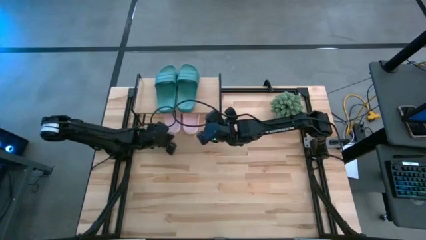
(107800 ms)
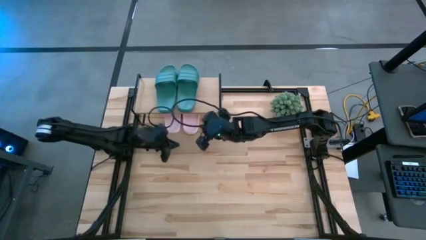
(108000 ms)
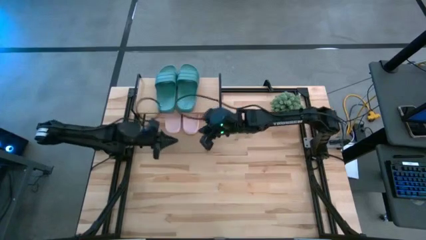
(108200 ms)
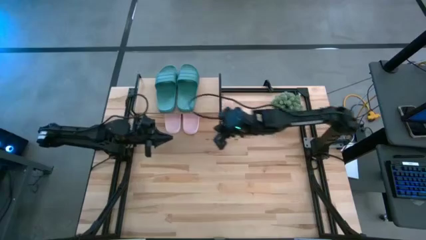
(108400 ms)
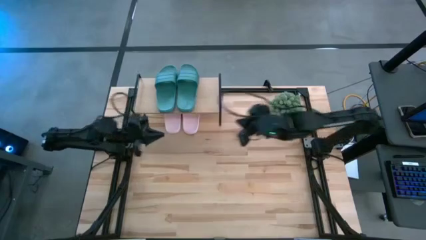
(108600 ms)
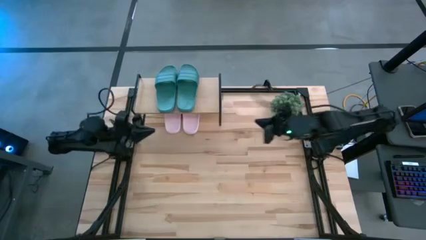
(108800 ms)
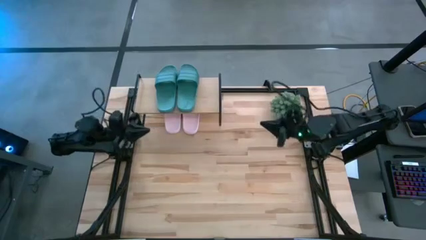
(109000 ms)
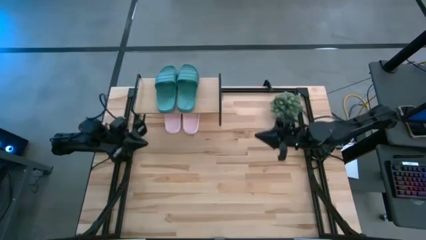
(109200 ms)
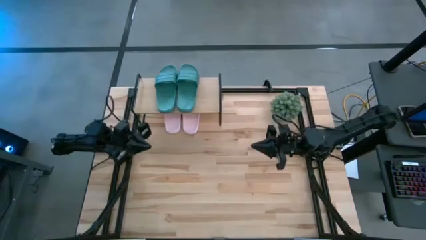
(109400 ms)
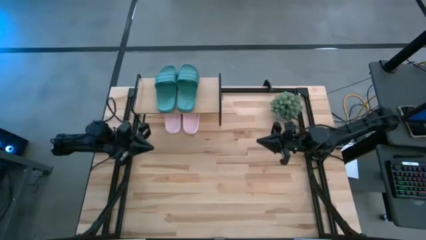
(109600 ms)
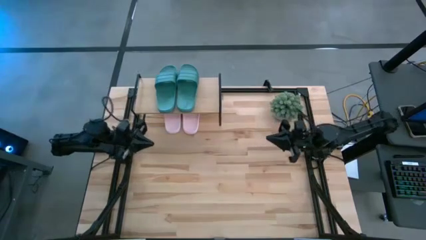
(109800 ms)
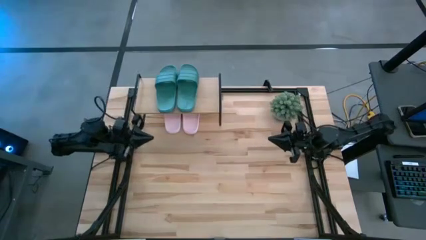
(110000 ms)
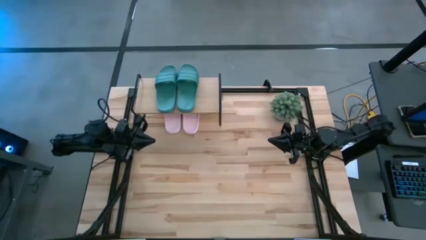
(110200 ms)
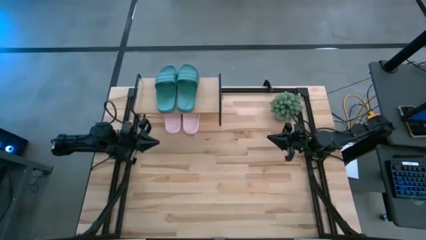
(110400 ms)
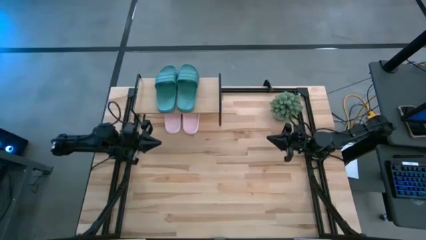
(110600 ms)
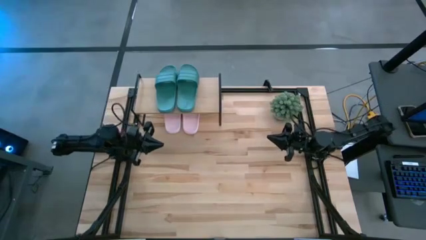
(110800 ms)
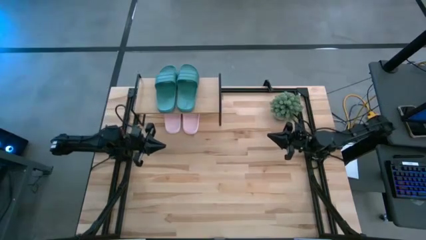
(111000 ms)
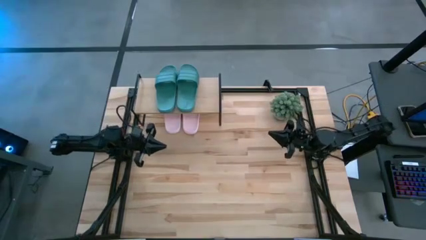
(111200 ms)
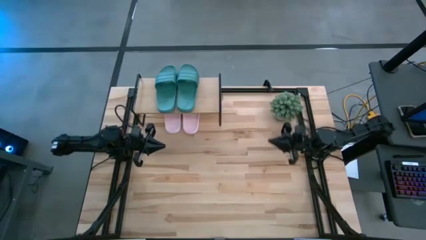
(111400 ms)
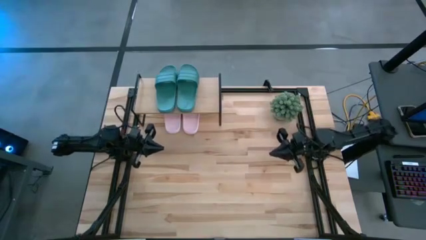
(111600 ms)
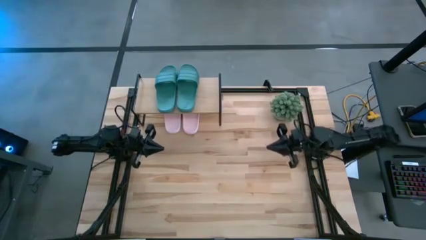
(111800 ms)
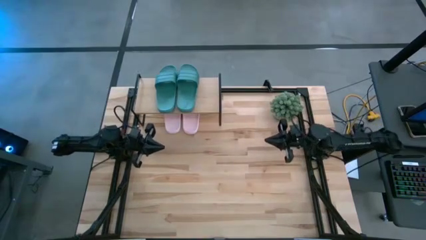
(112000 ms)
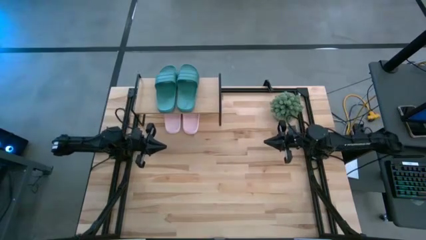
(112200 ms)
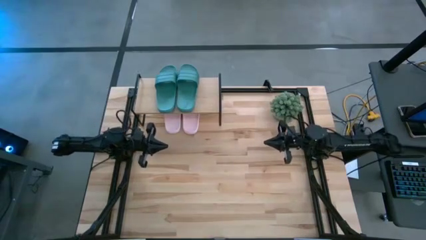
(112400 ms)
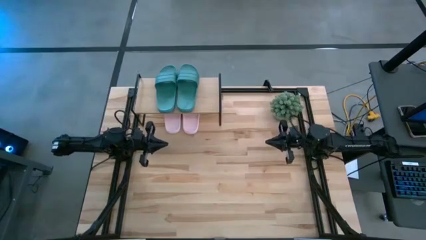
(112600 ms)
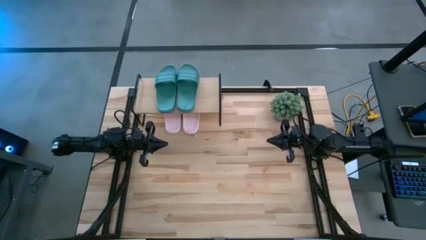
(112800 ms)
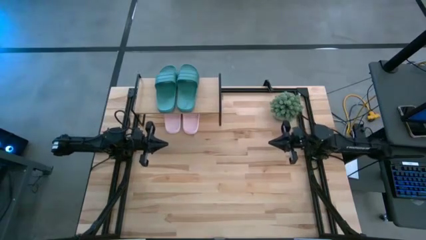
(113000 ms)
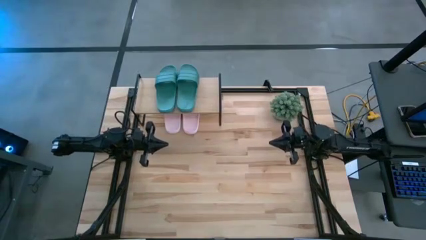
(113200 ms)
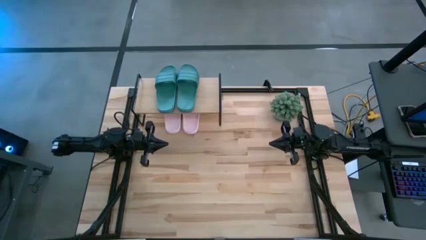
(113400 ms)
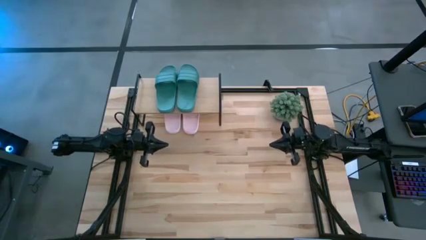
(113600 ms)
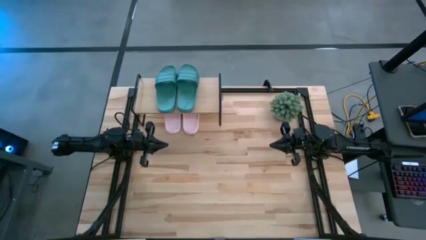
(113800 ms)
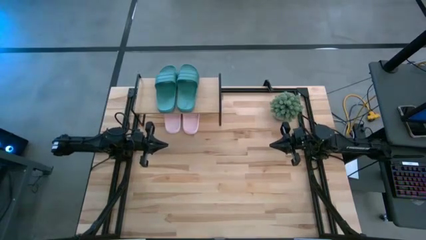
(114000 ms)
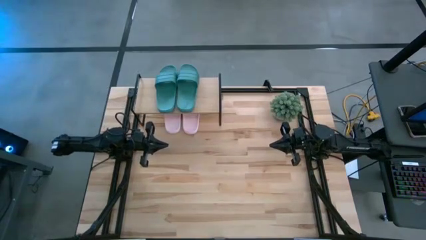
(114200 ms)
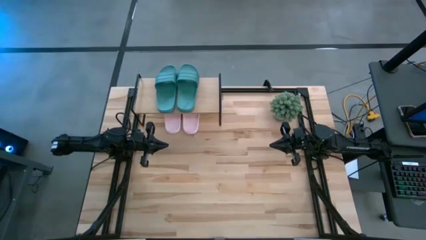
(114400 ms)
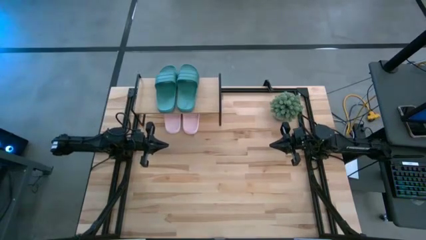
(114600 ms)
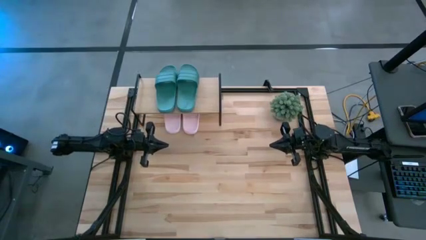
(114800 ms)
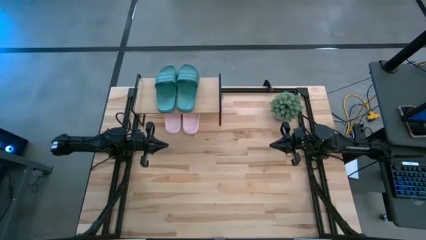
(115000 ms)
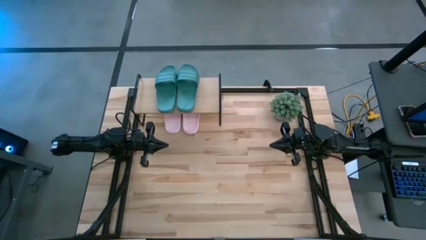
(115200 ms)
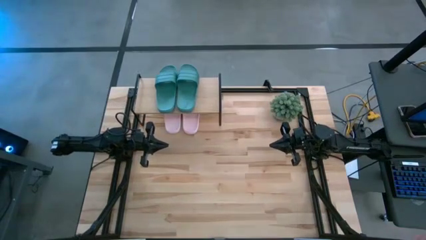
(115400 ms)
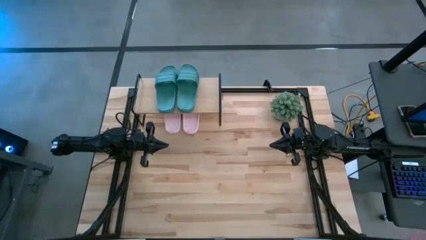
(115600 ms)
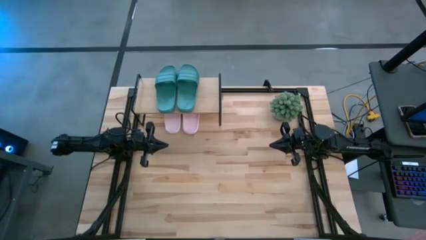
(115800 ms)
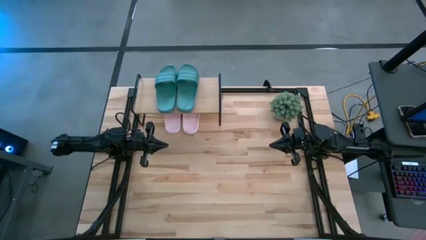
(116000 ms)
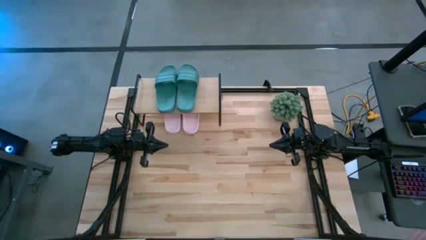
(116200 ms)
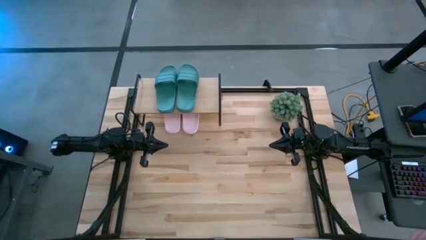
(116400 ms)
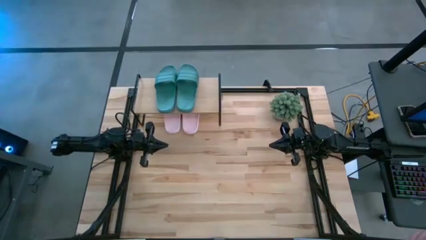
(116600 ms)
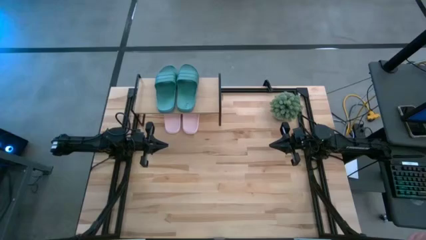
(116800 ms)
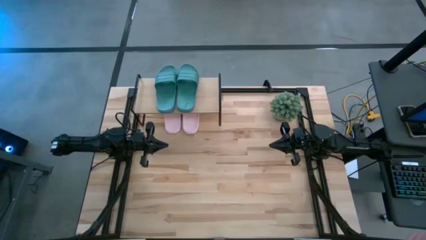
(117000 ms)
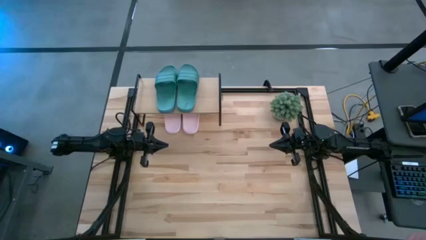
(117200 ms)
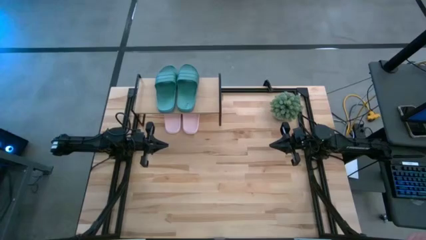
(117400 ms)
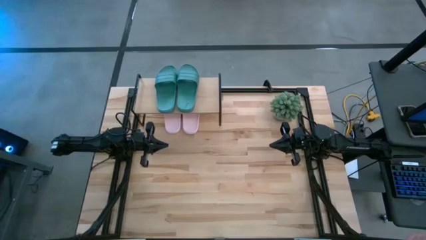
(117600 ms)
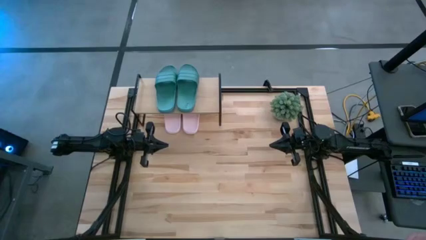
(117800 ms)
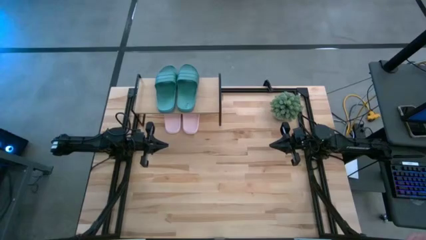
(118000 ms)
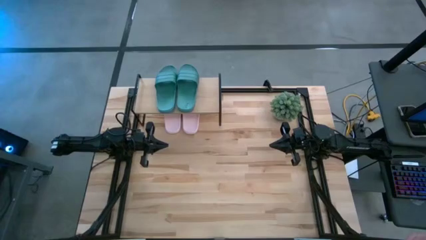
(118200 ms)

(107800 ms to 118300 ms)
Task: Pick and place slides into the shelf
Return to Home Position

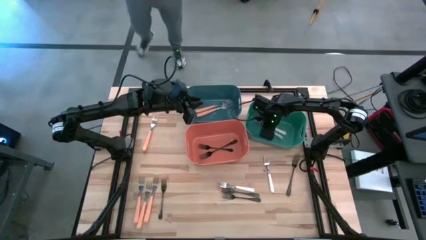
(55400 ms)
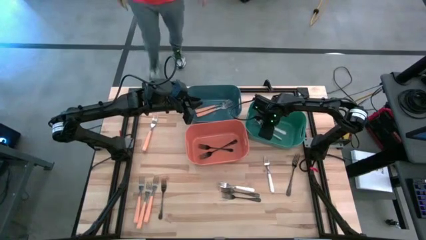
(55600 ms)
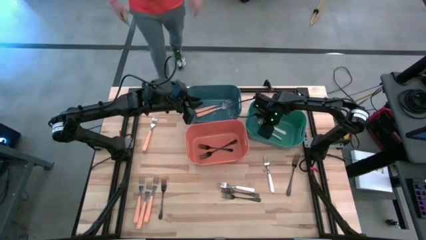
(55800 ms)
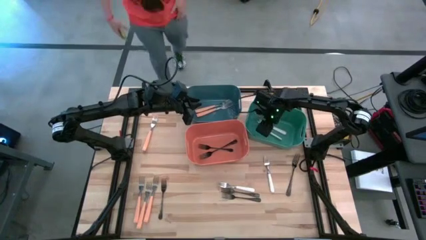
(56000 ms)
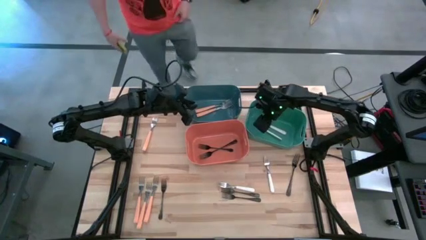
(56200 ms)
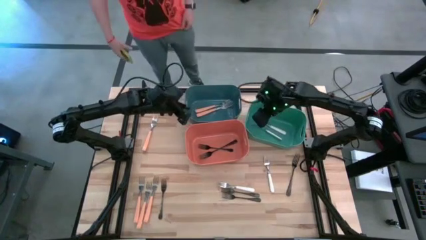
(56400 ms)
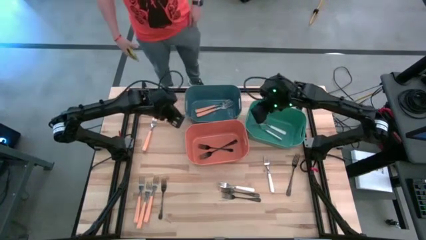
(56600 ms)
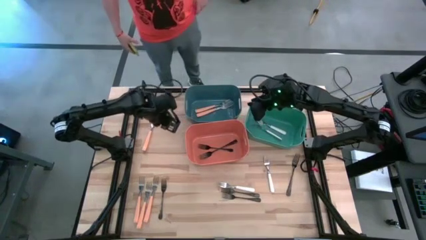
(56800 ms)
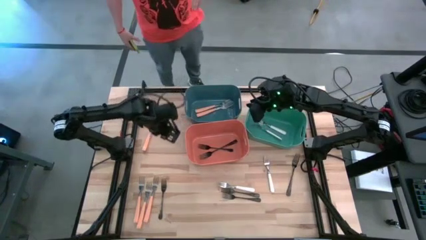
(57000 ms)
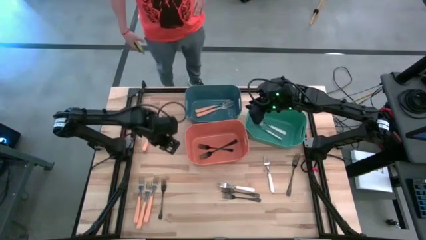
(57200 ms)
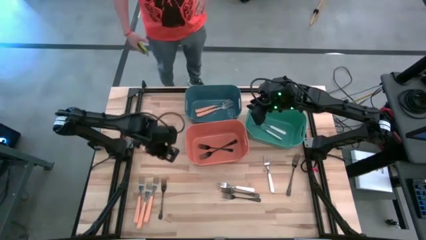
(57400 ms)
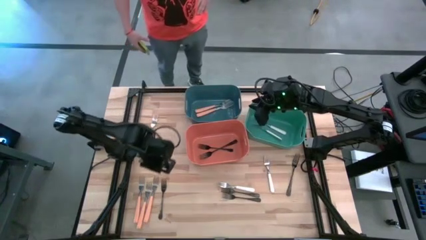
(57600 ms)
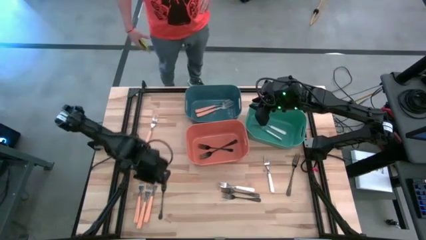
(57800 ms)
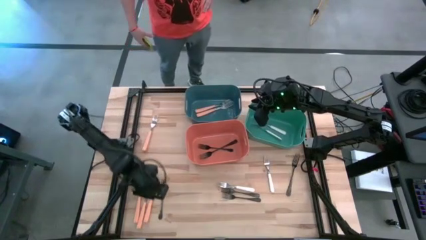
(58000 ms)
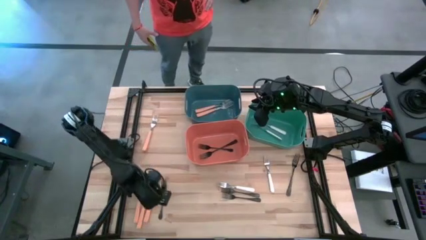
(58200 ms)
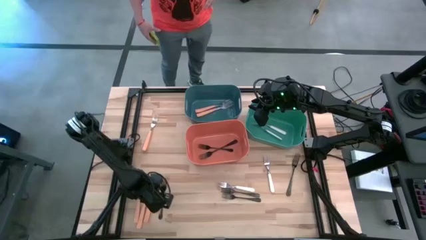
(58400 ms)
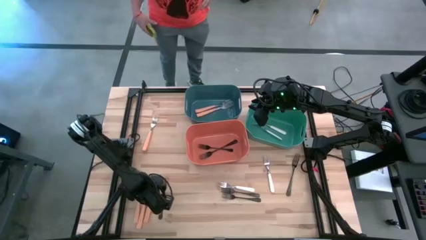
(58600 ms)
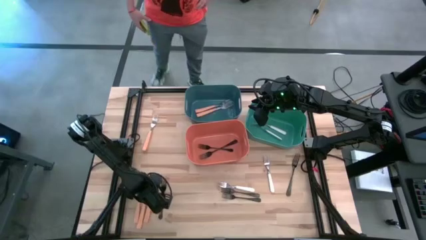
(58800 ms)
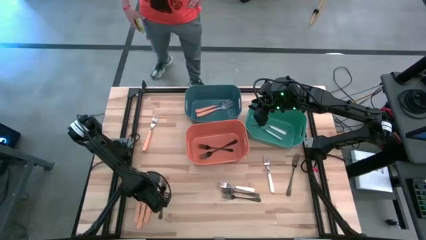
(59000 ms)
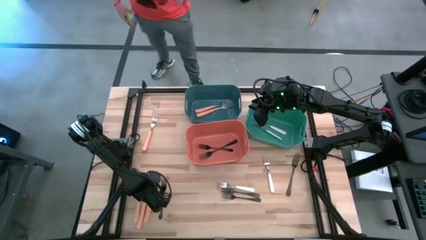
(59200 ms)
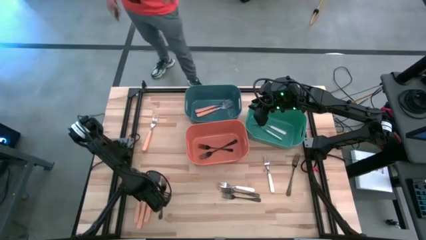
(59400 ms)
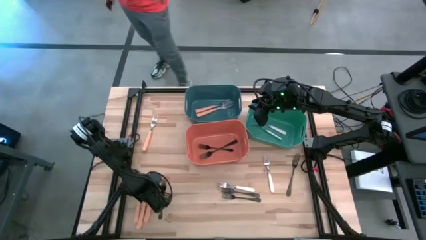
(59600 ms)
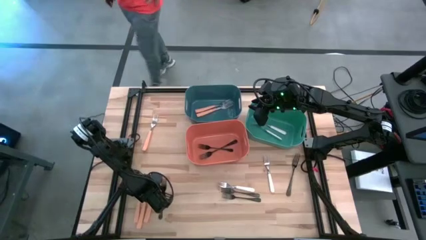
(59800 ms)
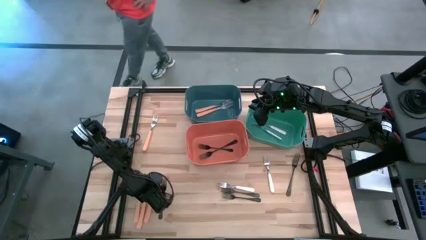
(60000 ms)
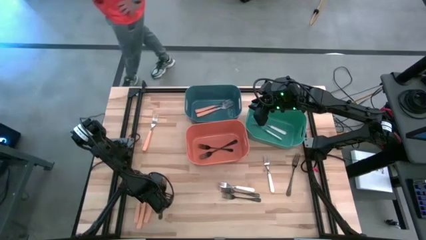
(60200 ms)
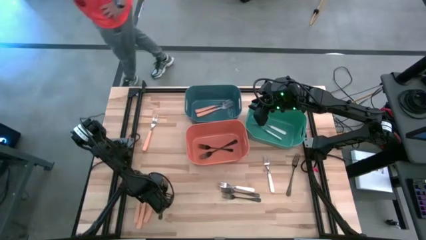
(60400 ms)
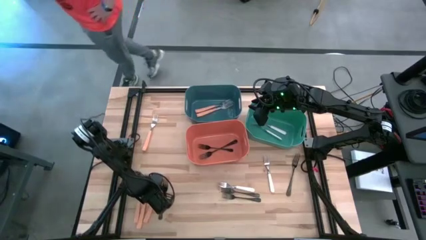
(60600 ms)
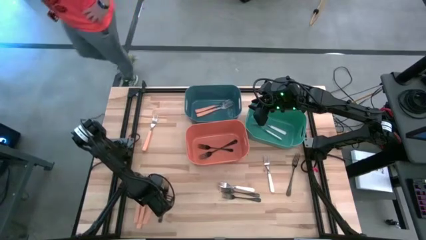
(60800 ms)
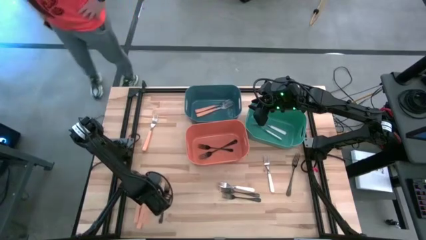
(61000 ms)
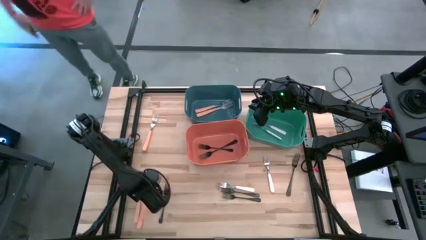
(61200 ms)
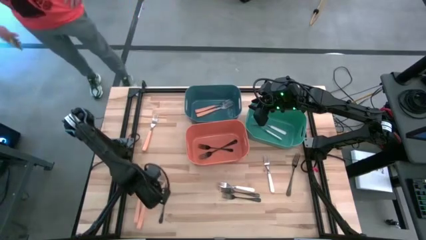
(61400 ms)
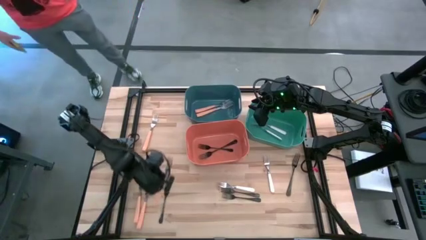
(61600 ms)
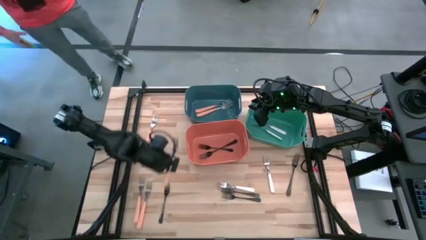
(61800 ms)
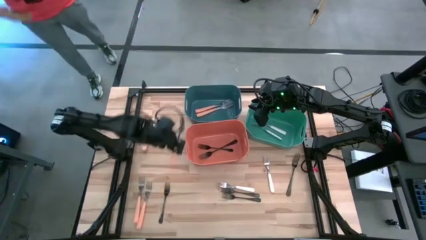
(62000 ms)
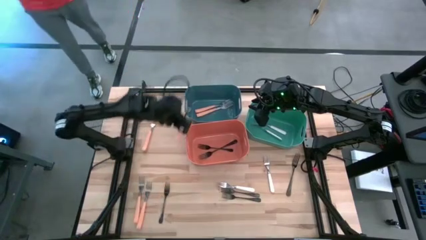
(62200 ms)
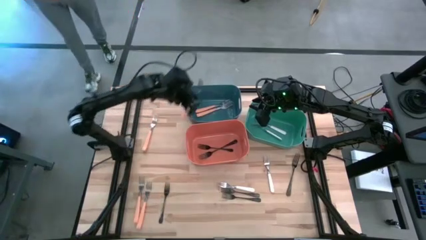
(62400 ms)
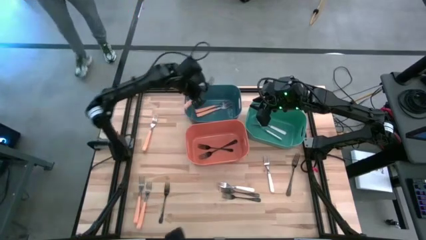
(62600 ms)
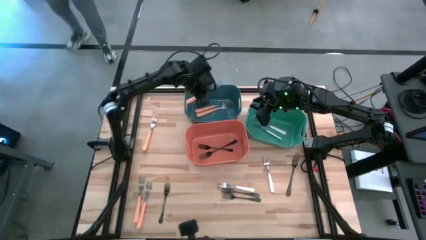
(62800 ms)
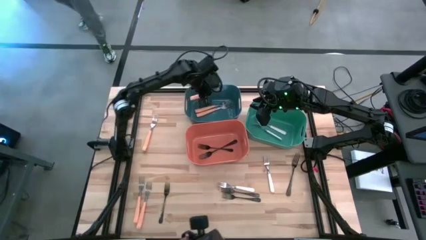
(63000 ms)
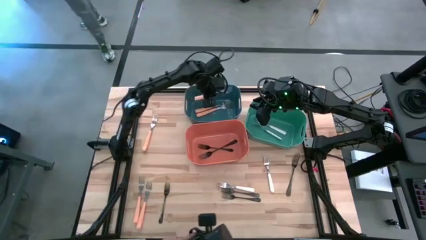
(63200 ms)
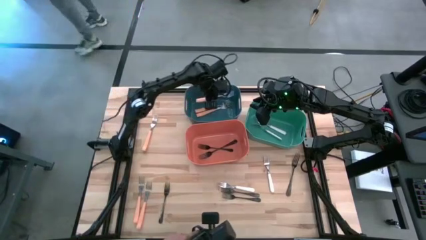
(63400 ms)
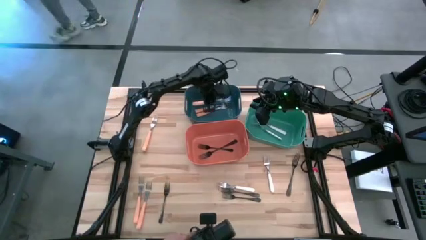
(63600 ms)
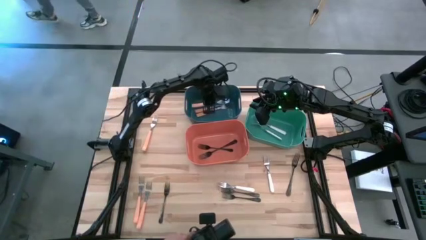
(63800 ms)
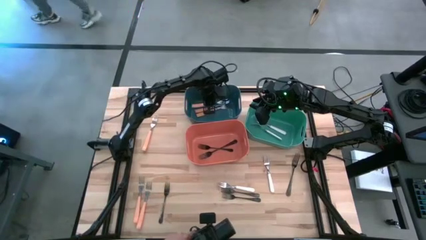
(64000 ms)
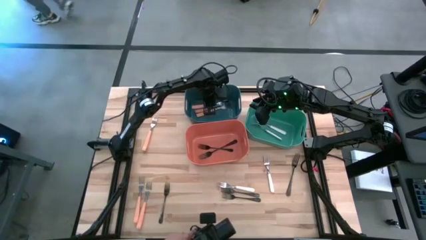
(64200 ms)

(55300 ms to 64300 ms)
Task: Sort silverware by color (type)
Put the orange fork into the blue bin
